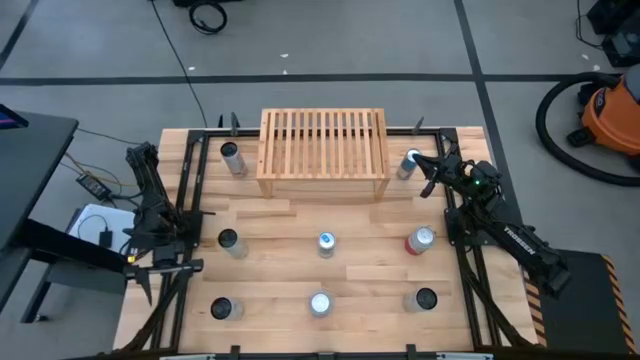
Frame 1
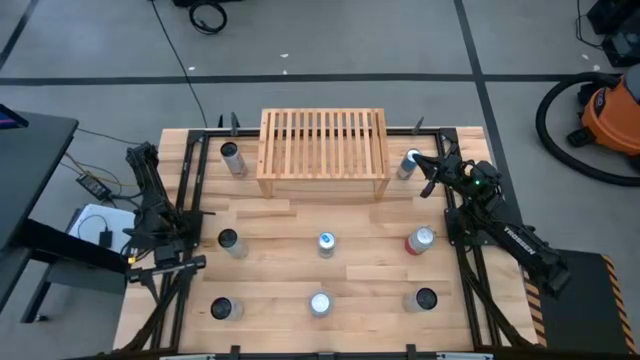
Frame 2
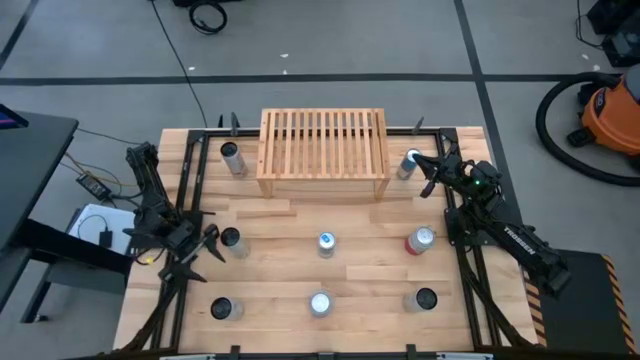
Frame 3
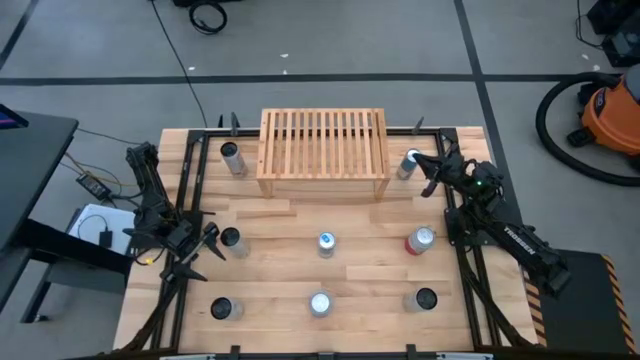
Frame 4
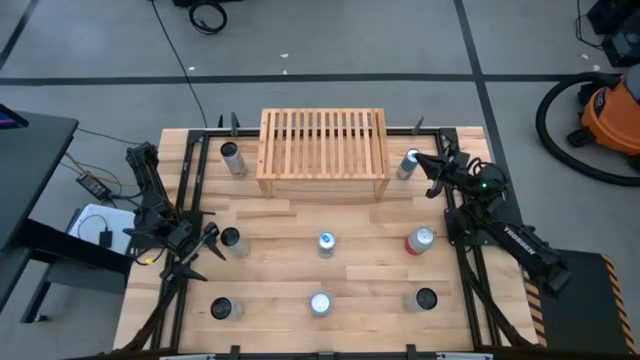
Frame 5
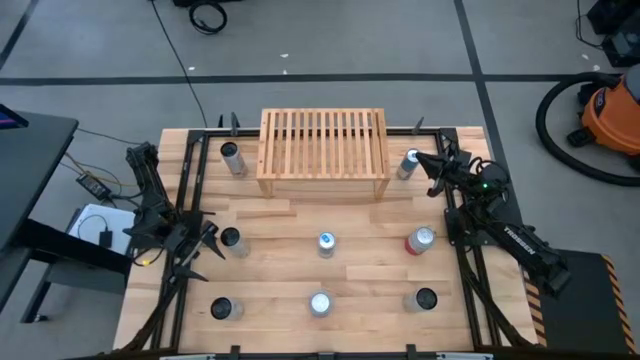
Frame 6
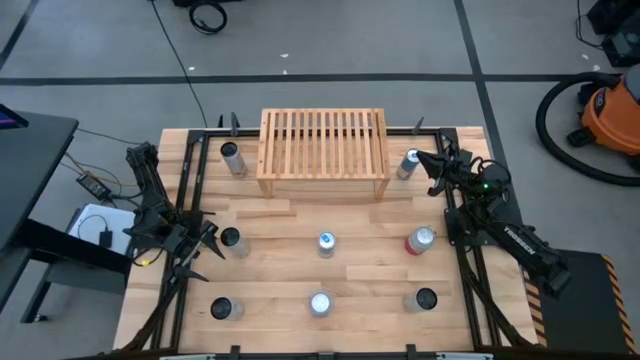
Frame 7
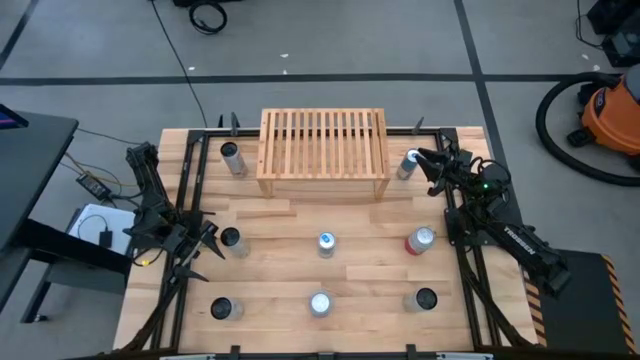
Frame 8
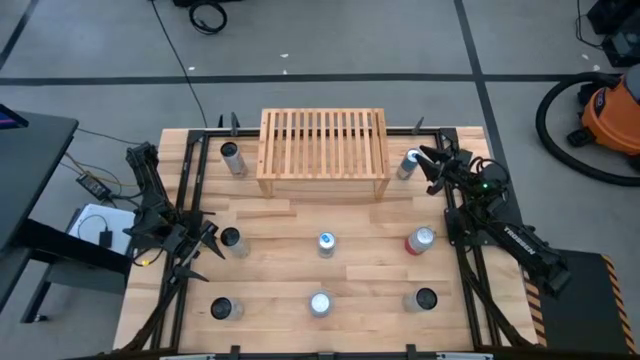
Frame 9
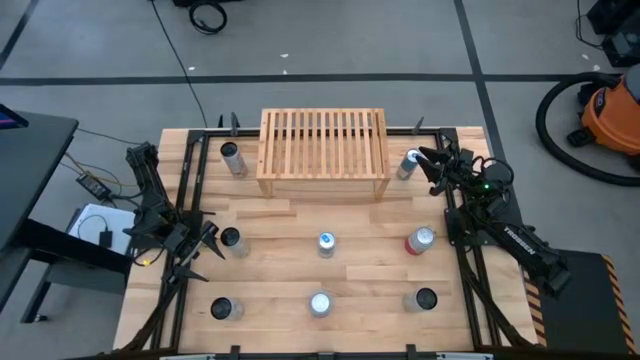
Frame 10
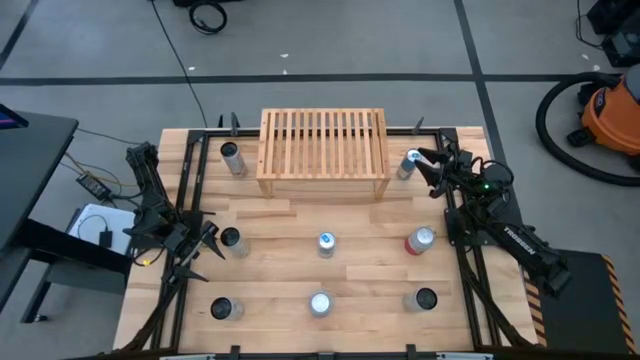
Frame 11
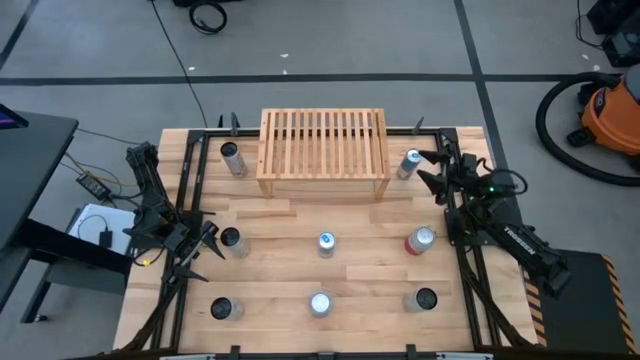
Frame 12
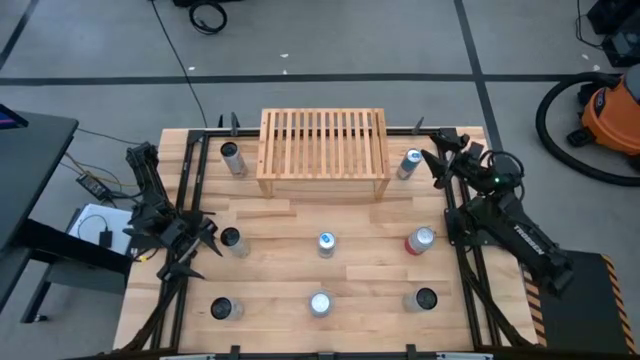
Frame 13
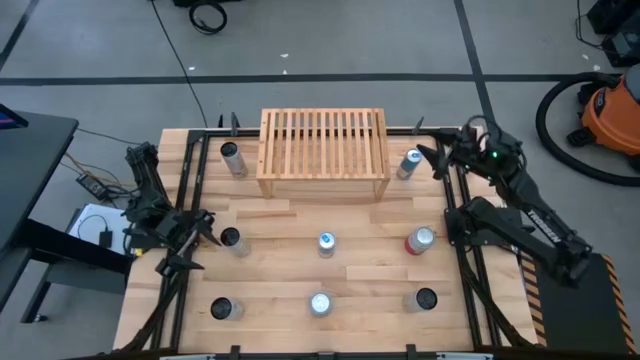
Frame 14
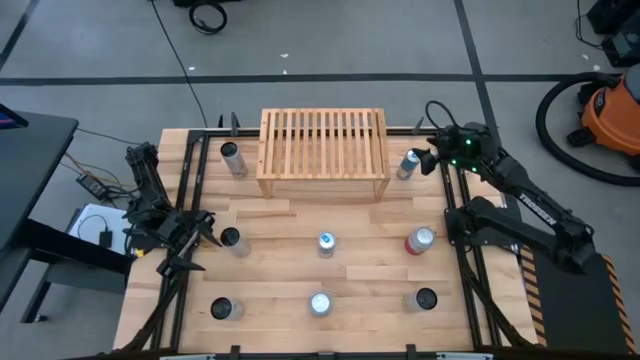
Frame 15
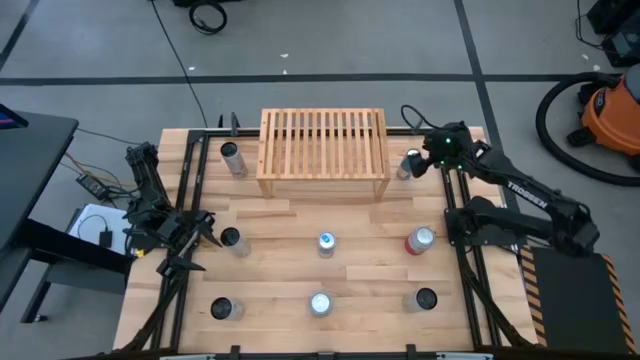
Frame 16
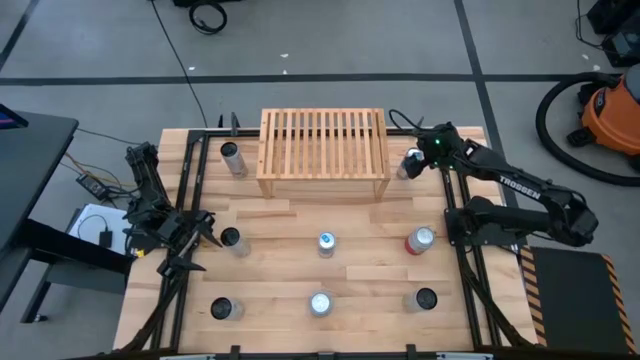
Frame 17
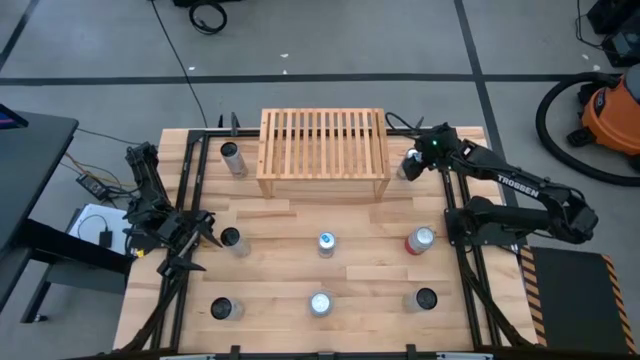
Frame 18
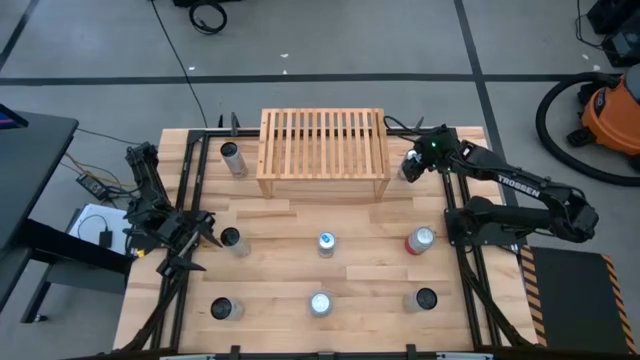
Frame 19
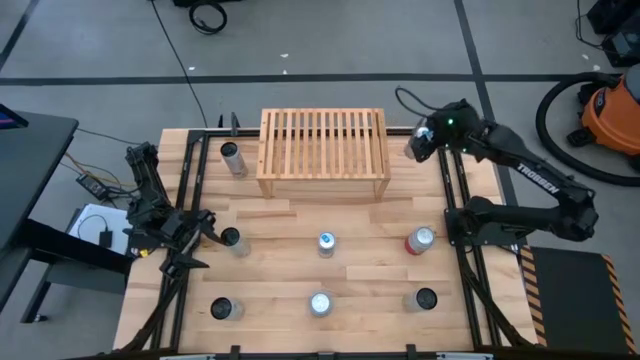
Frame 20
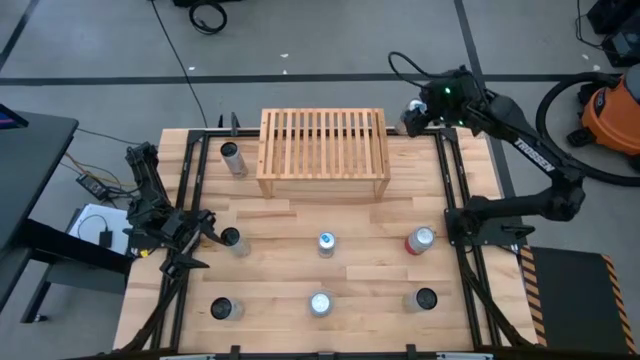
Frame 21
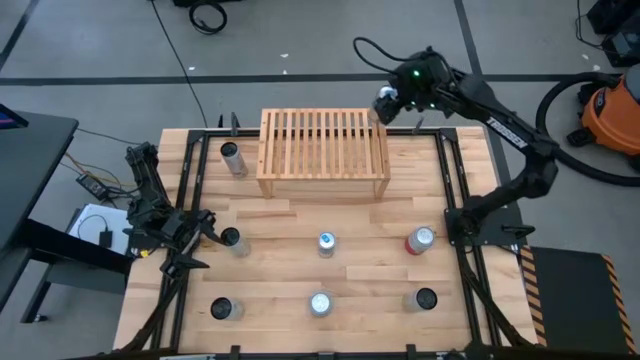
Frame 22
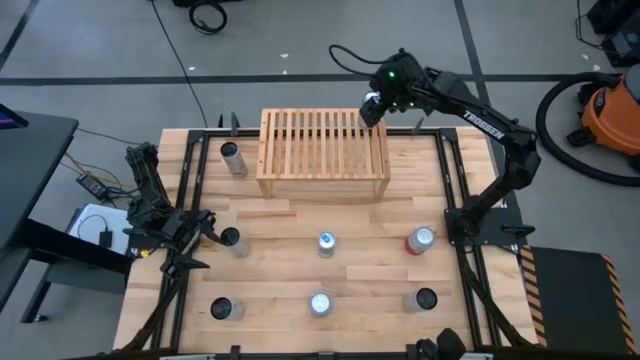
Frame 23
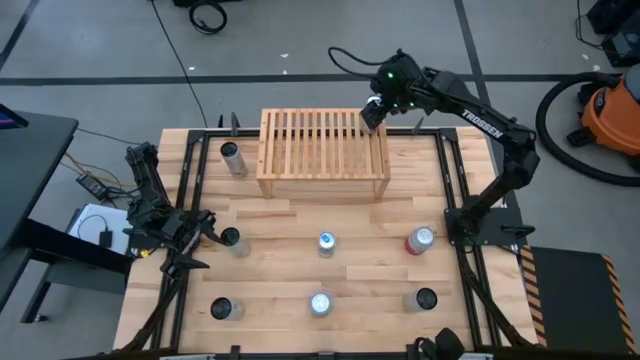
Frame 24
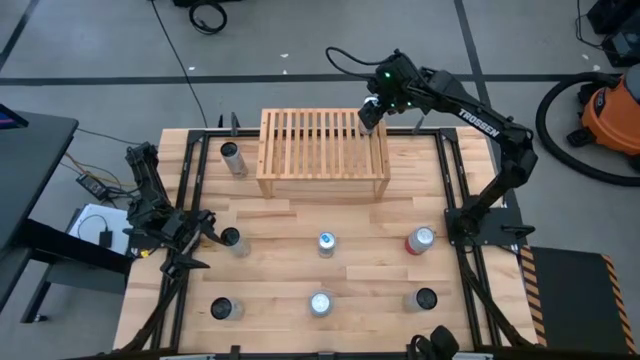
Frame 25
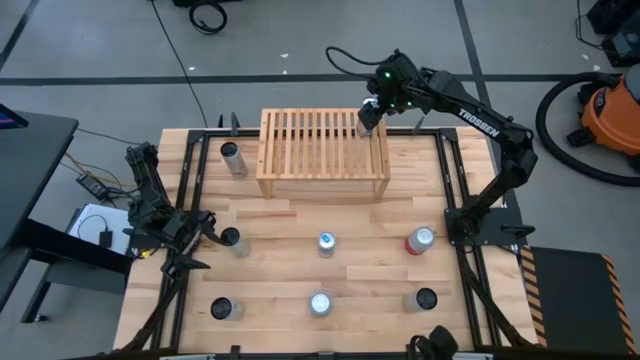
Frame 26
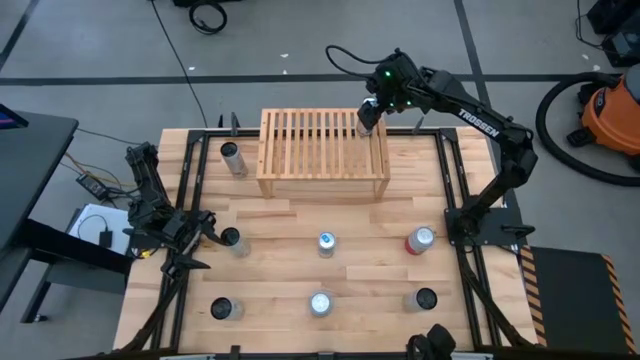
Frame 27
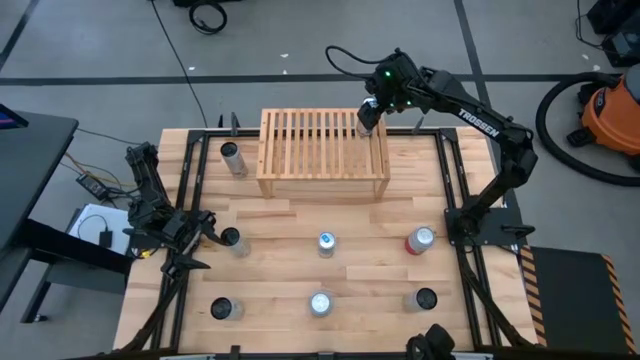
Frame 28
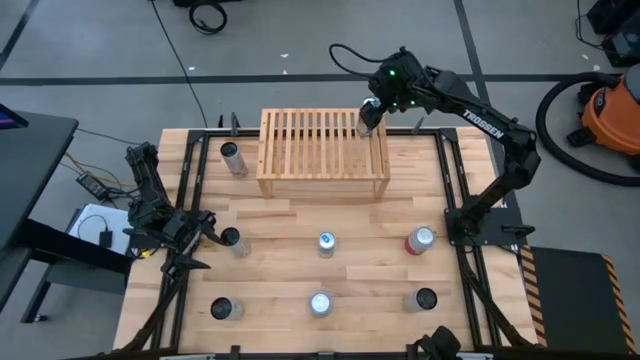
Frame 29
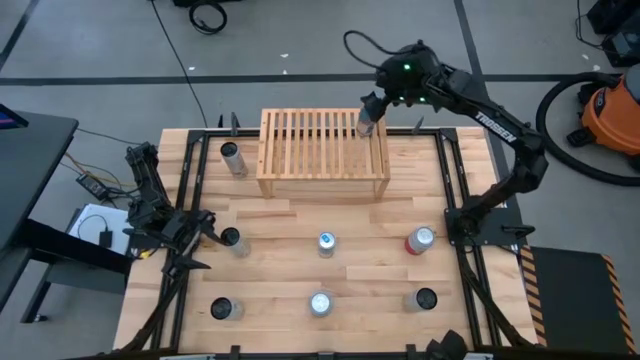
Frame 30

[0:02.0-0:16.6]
Task: Place canned beverage on shelf
Put the top blue soda can on the shelf
